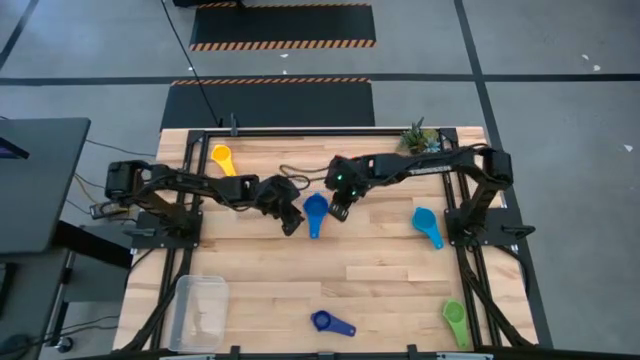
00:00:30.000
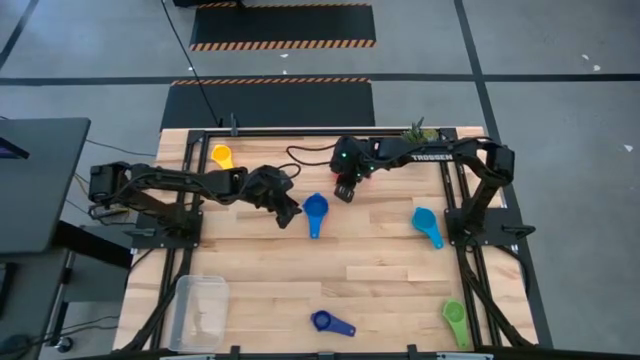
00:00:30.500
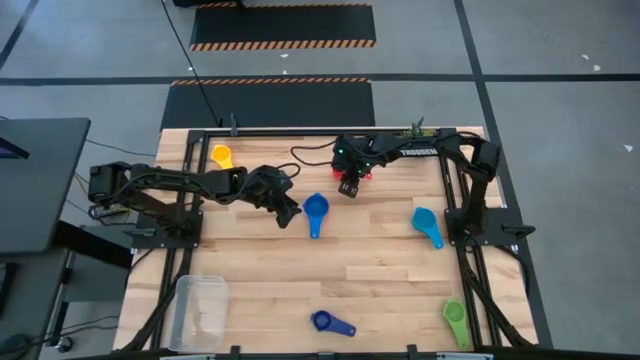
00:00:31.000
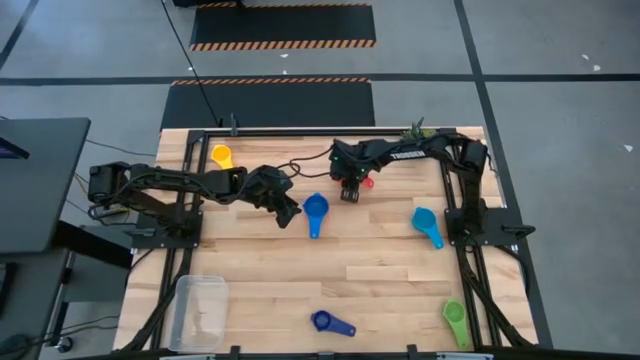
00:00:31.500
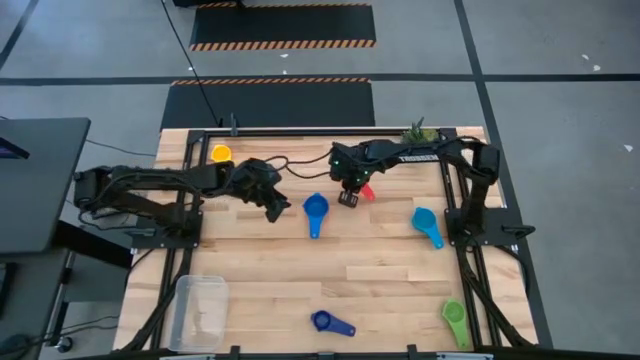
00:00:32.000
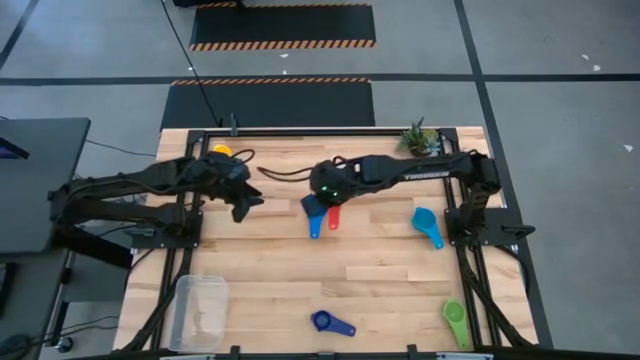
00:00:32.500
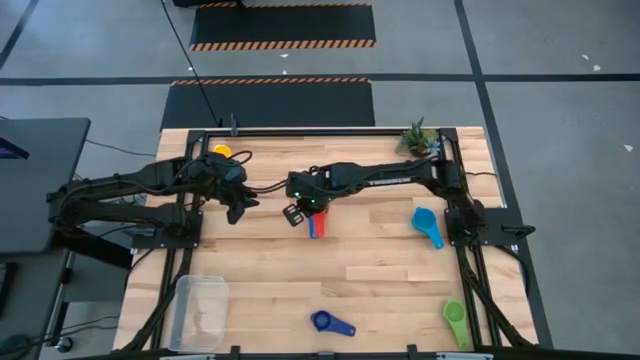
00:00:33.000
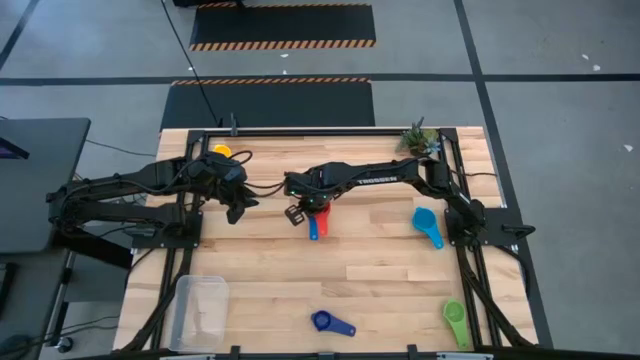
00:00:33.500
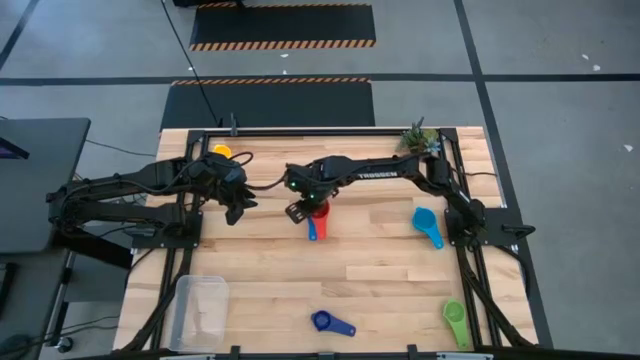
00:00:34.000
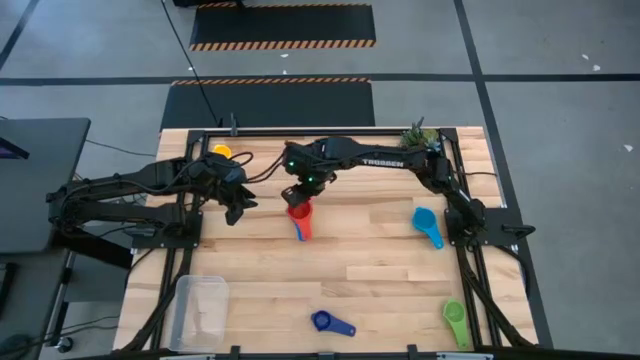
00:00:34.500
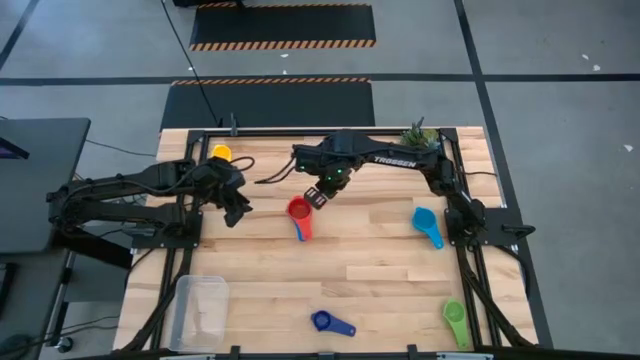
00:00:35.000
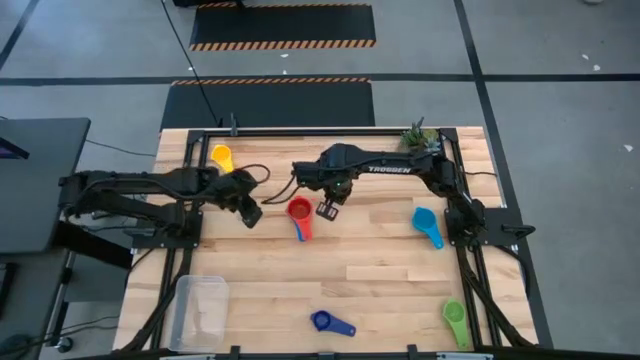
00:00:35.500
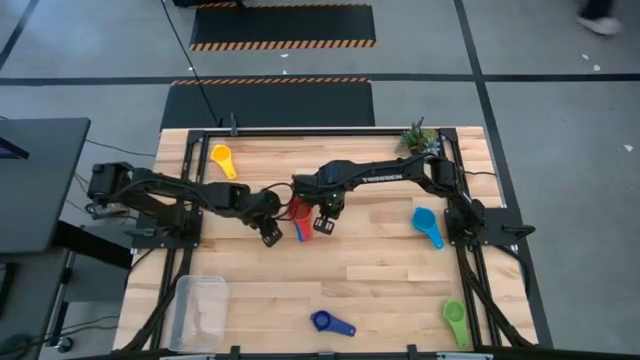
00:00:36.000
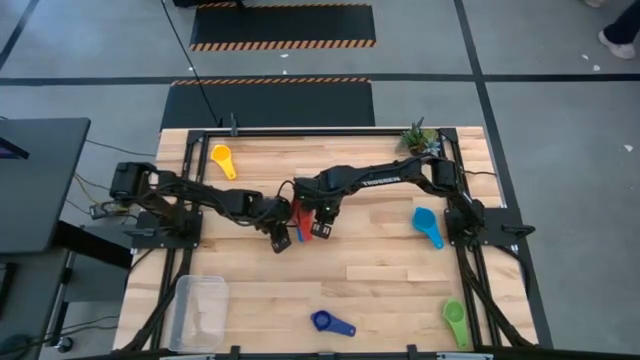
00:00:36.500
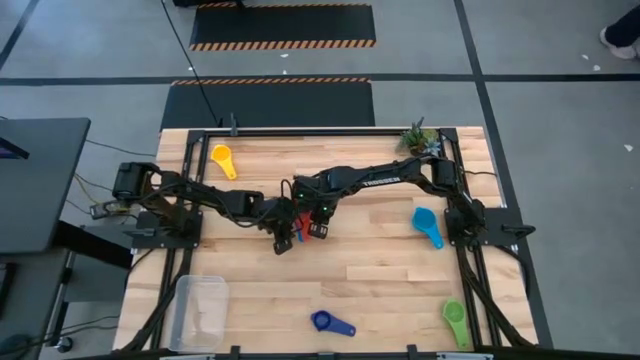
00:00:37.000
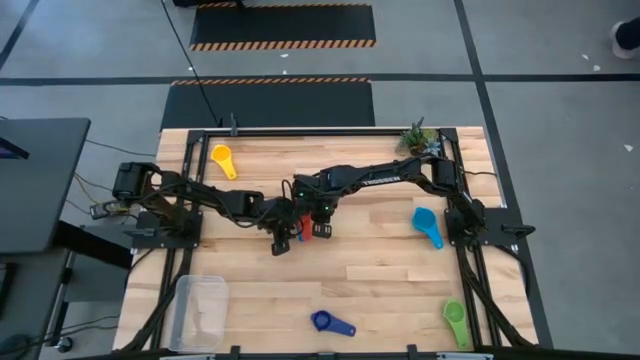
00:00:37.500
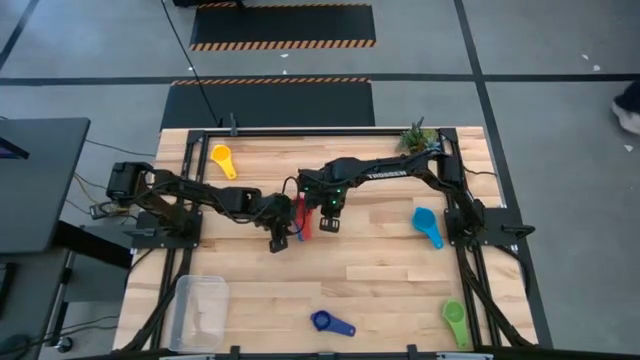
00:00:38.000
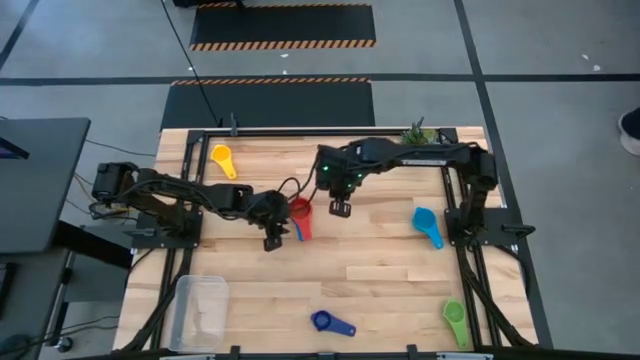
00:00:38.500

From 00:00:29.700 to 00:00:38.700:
Task: Nest measuring cups in basket
Stack the red measuring cup on top of the blue measuring cup

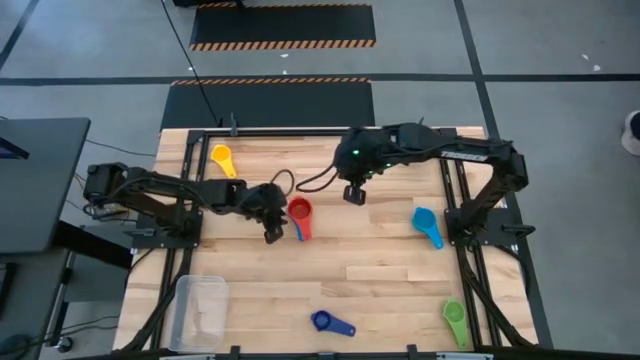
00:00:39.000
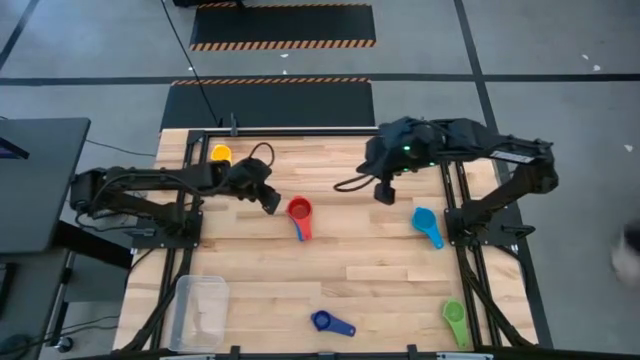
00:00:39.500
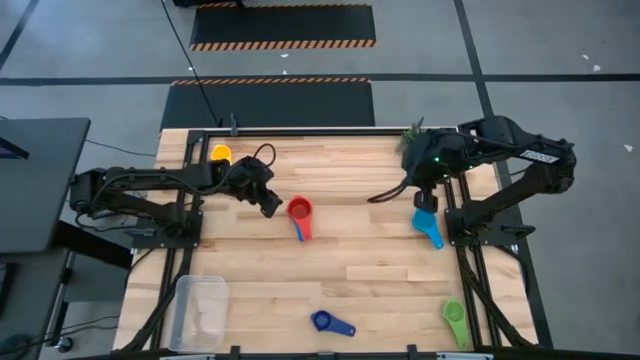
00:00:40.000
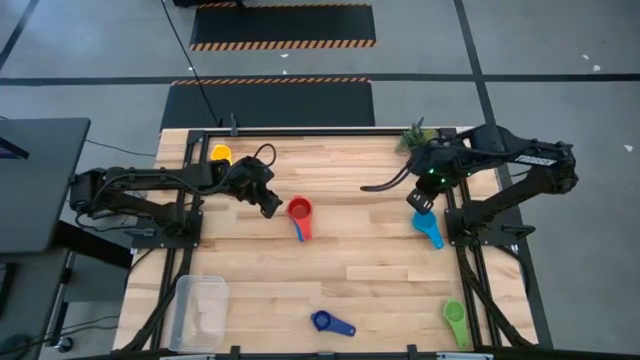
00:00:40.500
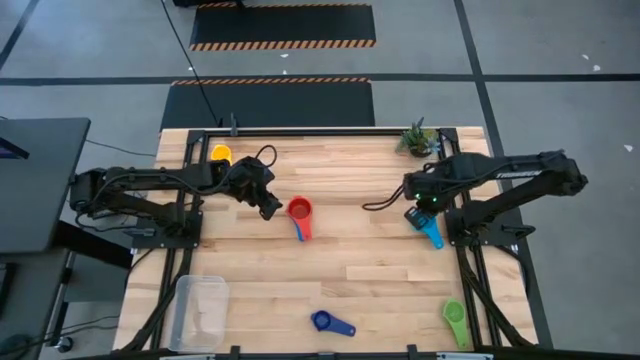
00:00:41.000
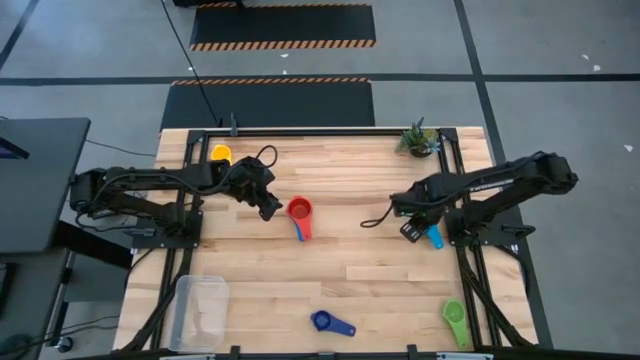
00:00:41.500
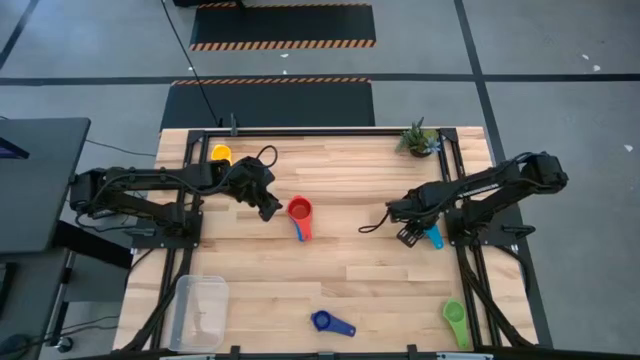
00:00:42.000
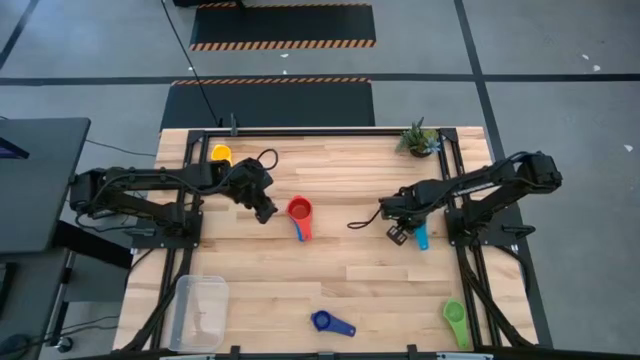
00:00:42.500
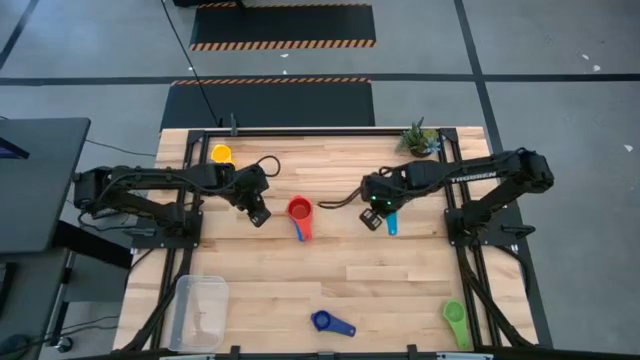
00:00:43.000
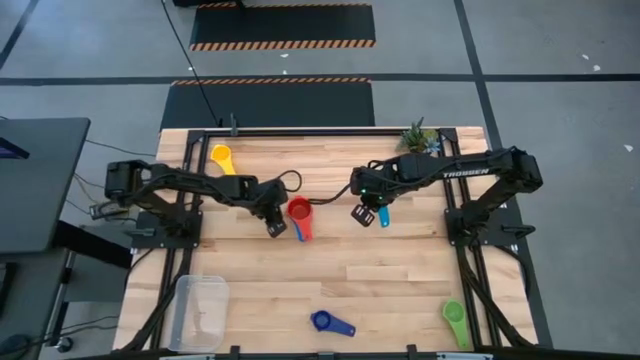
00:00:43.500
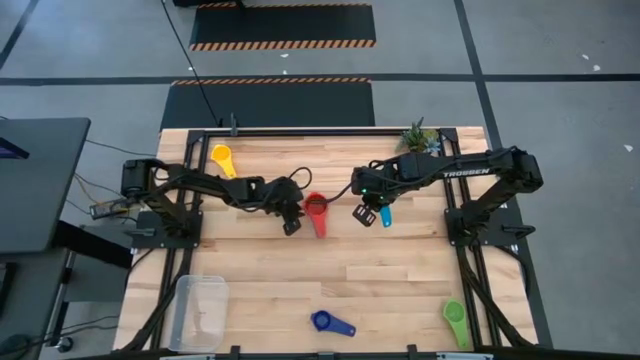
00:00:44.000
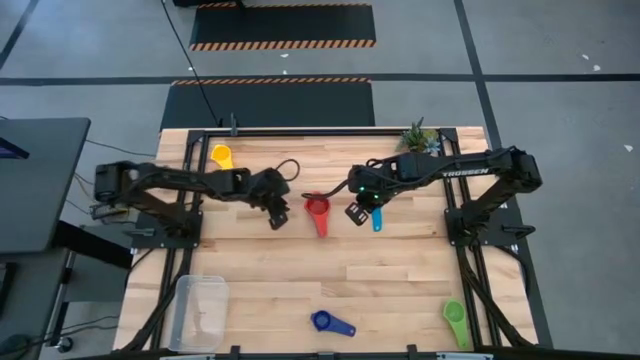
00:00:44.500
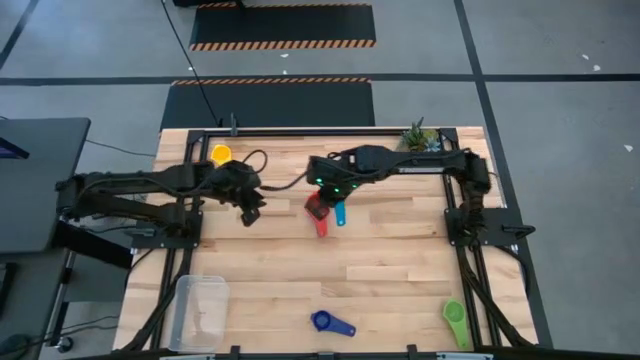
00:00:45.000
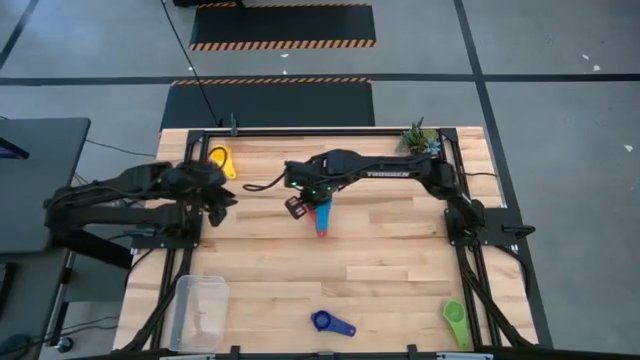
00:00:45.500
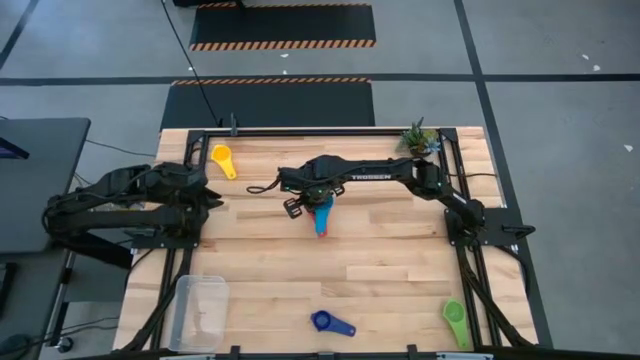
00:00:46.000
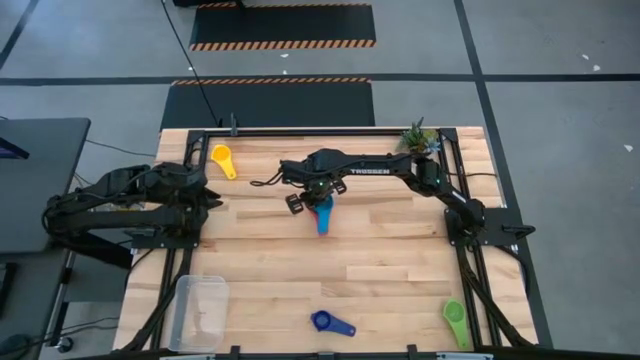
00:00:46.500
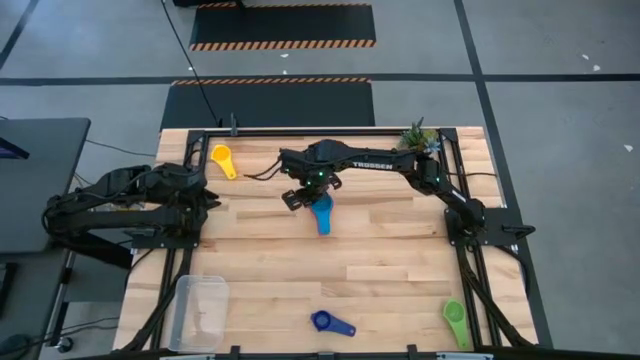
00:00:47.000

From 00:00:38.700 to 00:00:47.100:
Stack the blue measuring cup on top of the orange measuring cup

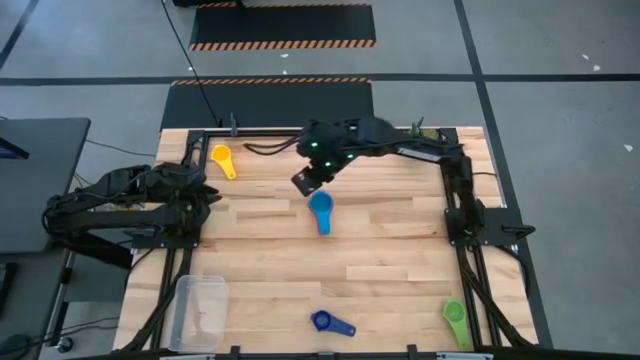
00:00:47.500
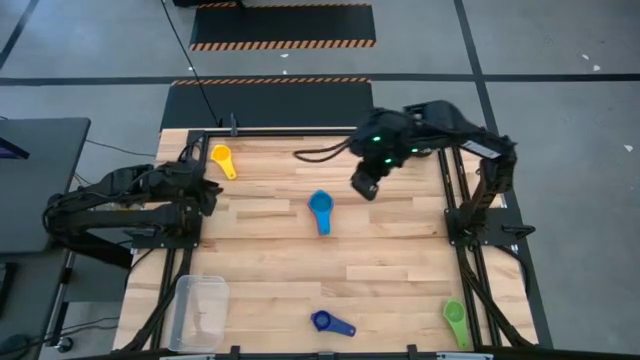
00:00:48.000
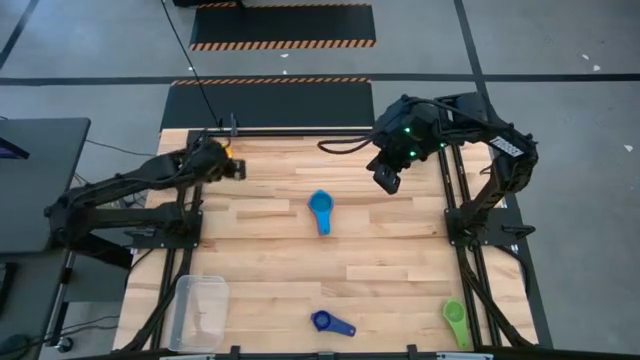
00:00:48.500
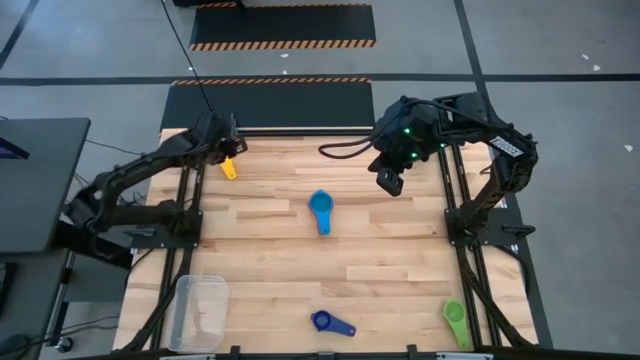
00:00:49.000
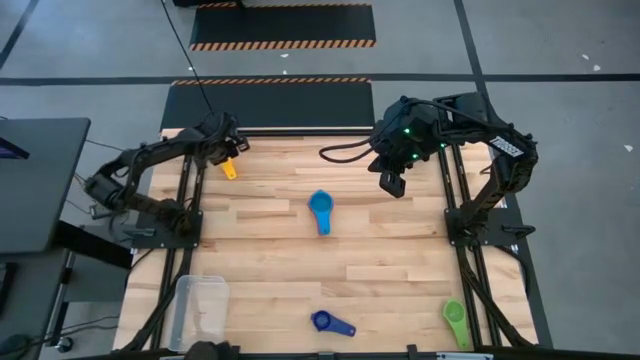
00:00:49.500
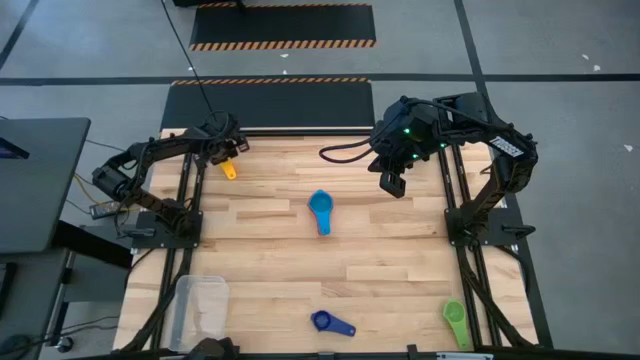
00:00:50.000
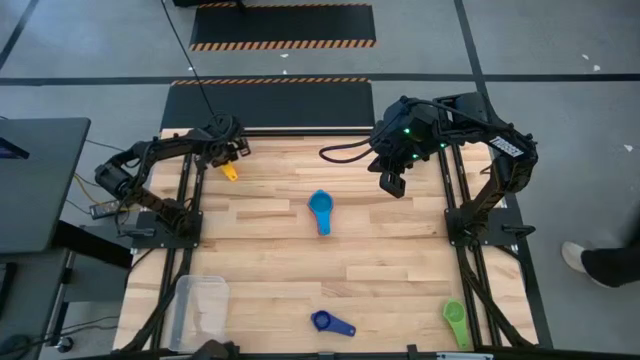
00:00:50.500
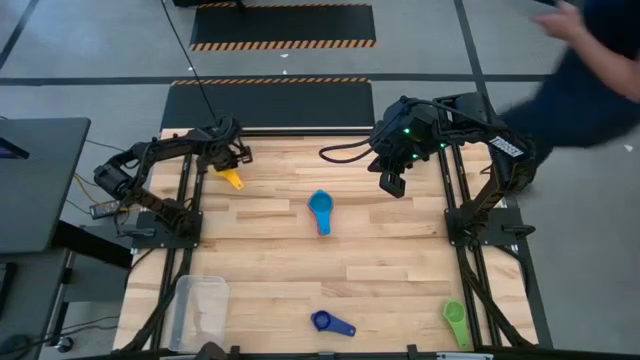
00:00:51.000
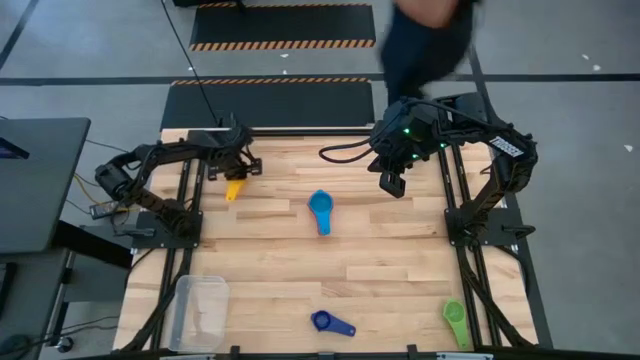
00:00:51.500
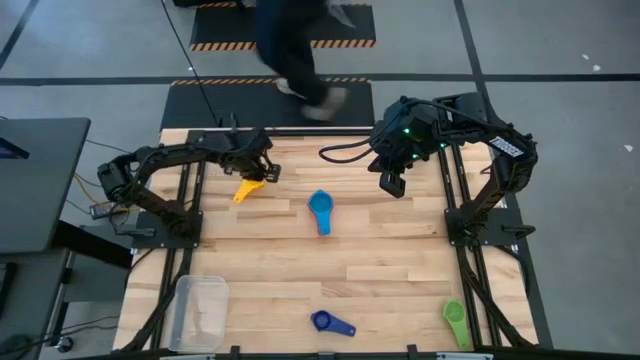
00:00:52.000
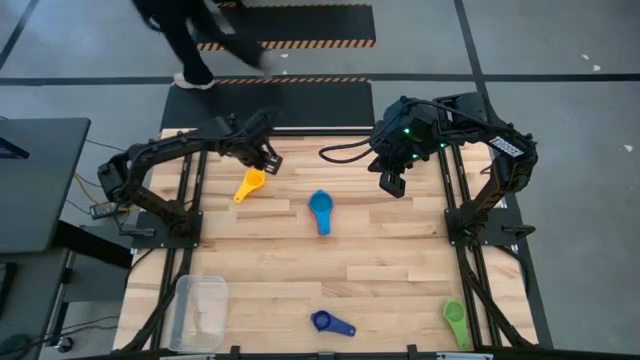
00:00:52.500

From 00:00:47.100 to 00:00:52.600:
Stack the yellow measuring cup on top of the blue measuring cup
